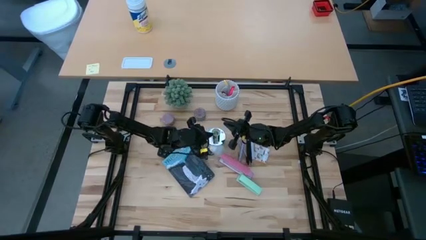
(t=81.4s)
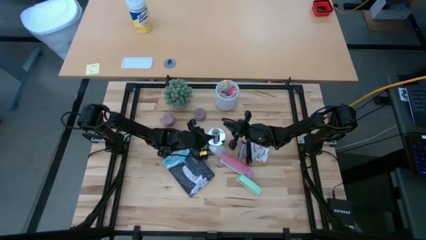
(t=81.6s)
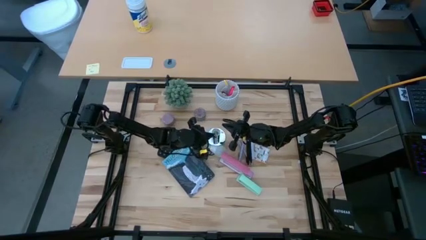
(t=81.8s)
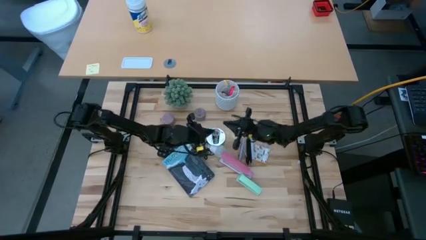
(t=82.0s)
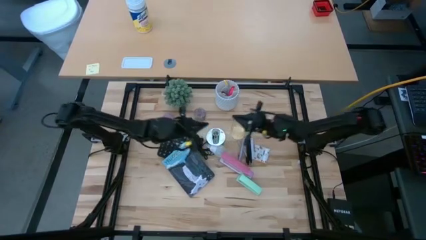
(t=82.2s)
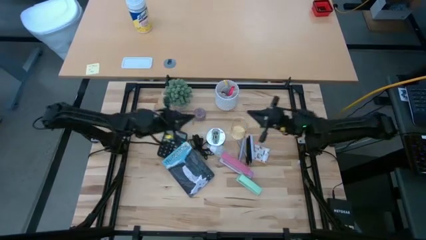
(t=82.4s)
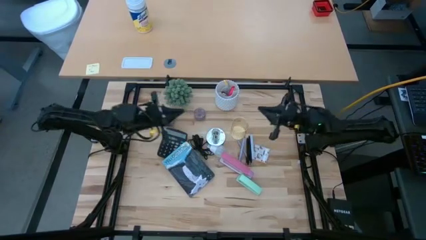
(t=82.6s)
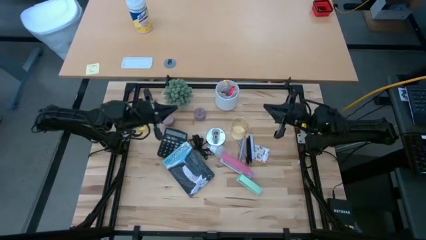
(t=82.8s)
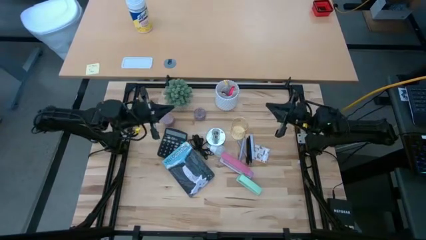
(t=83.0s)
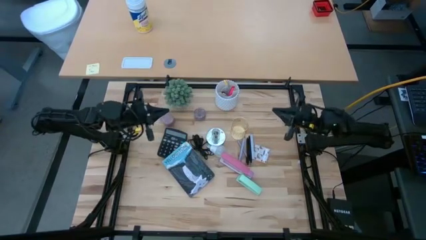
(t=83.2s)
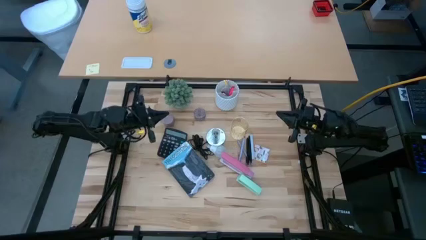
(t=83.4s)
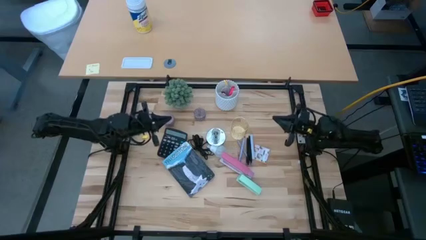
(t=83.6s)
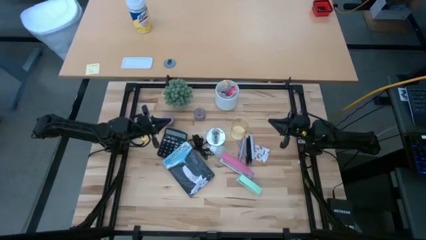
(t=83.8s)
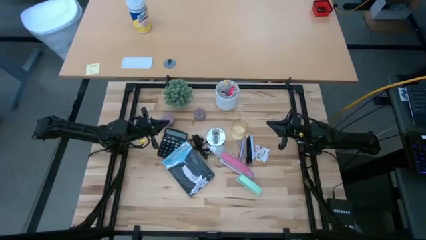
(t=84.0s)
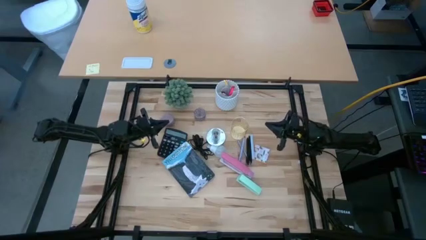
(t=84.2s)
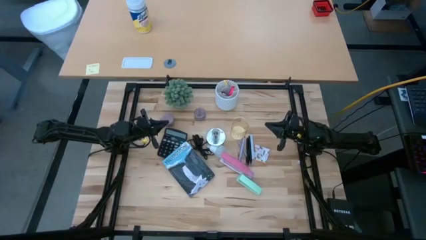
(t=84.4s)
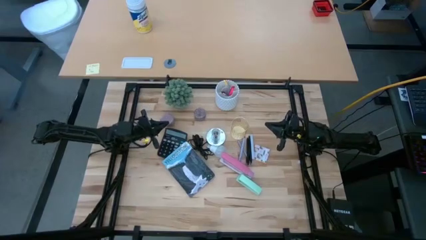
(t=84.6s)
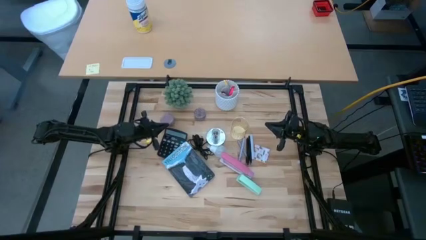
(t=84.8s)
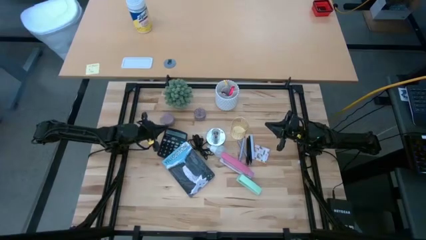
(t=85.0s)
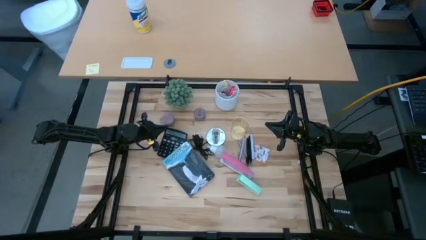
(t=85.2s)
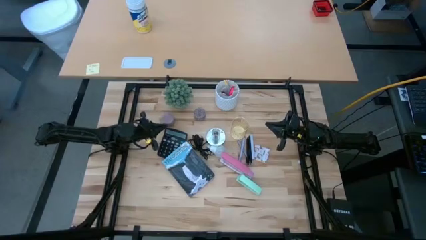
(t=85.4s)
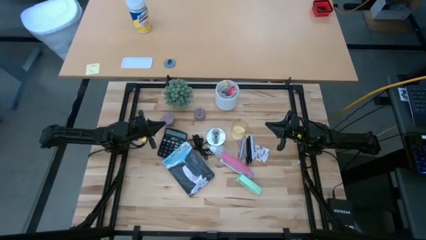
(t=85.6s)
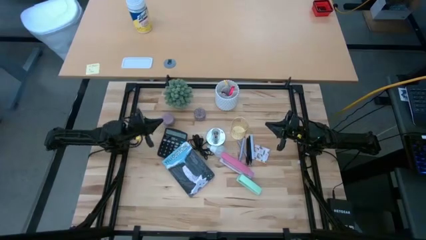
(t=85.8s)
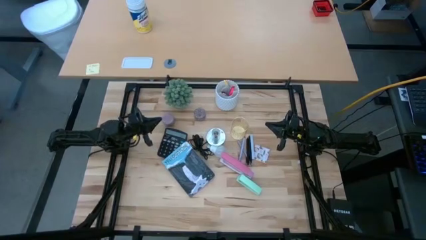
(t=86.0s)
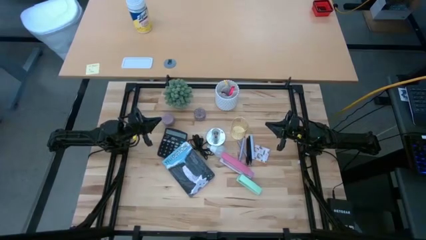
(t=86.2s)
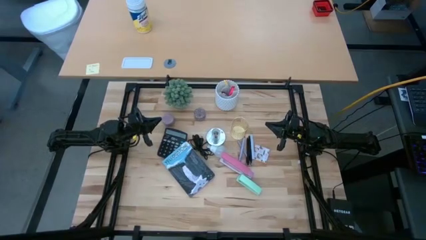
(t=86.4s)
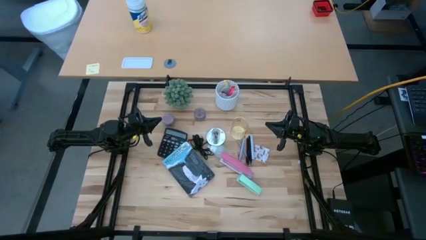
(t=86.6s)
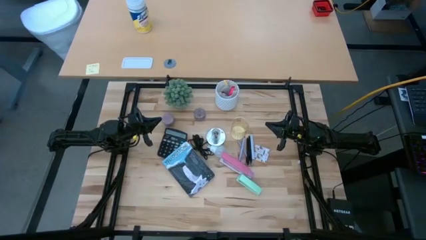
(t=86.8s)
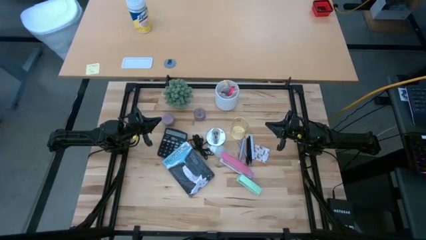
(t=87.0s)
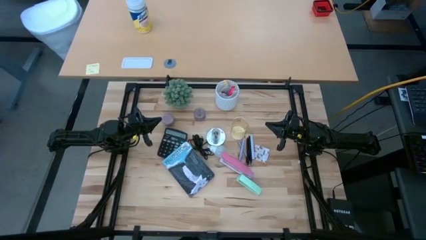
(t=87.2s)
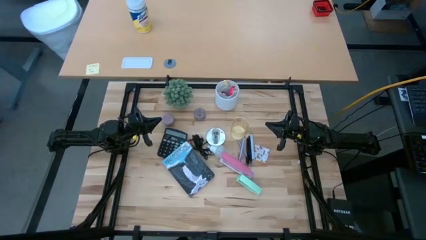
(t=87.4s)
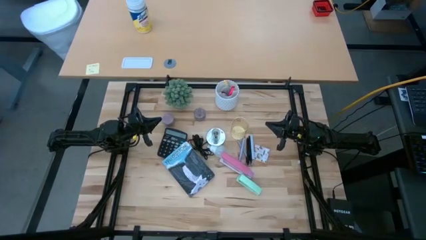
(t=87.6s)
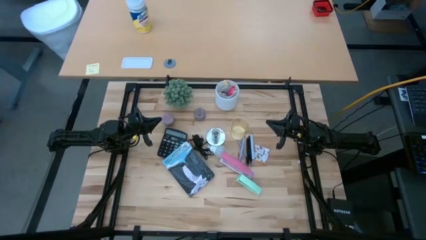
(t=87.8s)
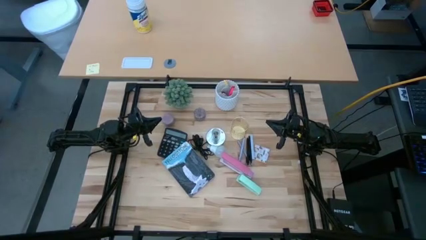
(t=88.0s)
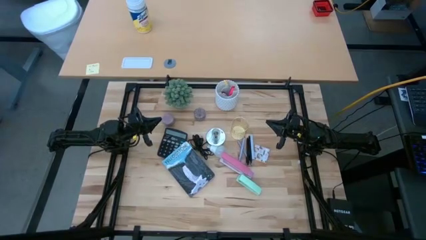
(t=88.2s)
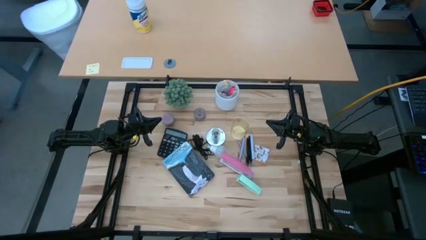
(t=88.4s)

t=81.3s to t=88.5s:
Task: Screw lightbulb
Return to Home Position

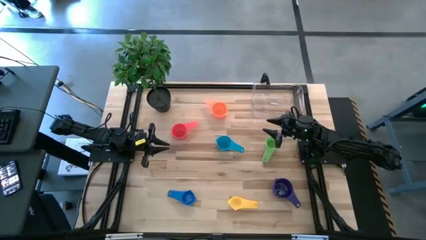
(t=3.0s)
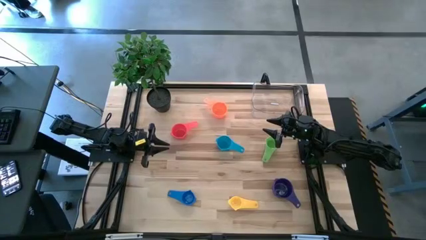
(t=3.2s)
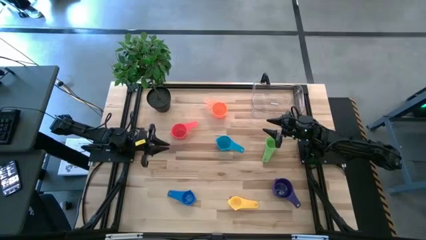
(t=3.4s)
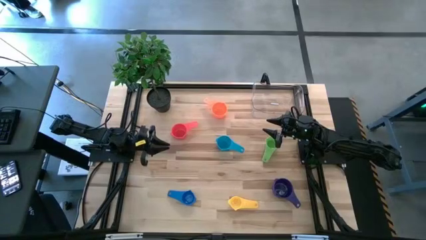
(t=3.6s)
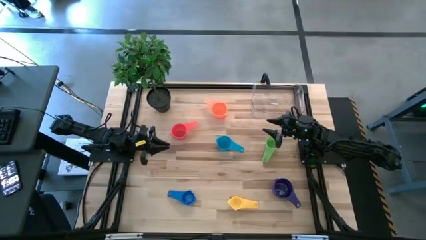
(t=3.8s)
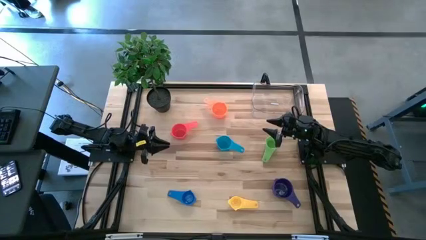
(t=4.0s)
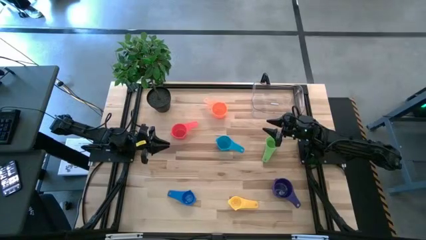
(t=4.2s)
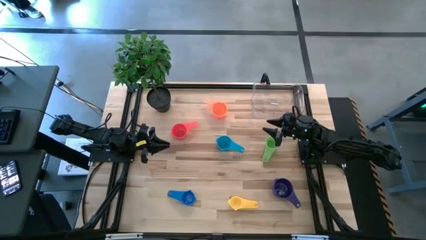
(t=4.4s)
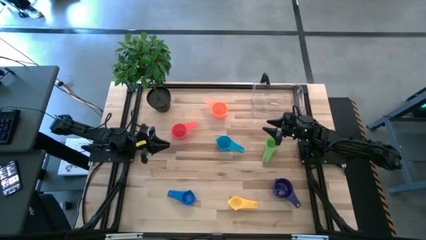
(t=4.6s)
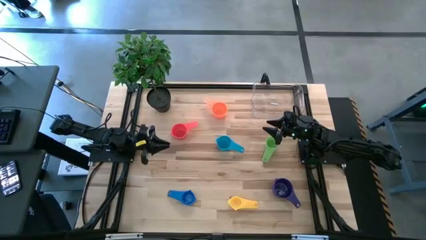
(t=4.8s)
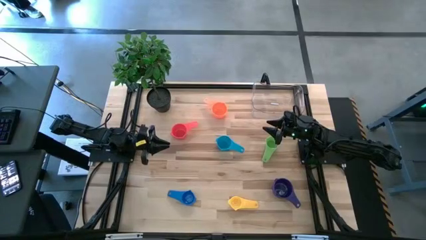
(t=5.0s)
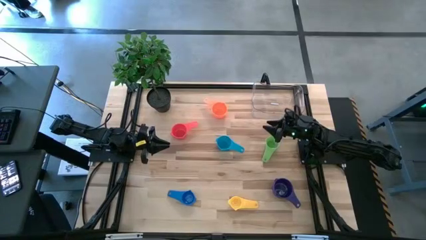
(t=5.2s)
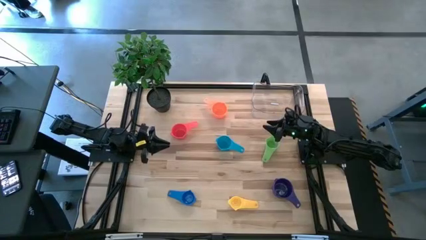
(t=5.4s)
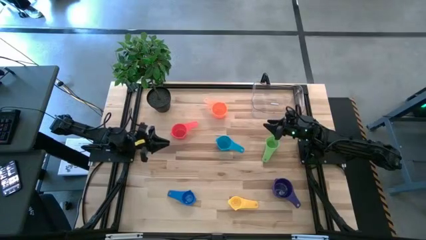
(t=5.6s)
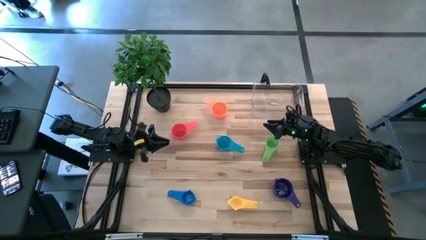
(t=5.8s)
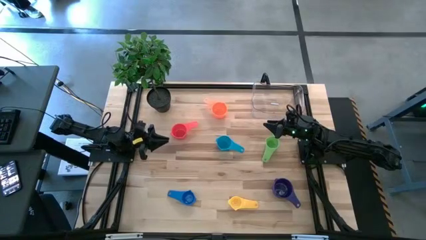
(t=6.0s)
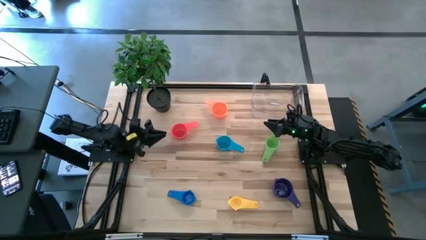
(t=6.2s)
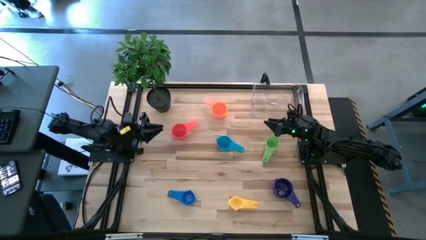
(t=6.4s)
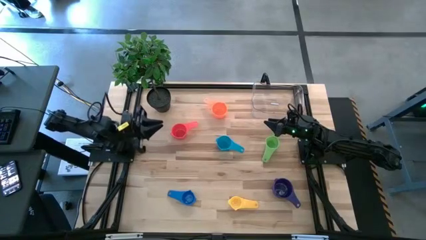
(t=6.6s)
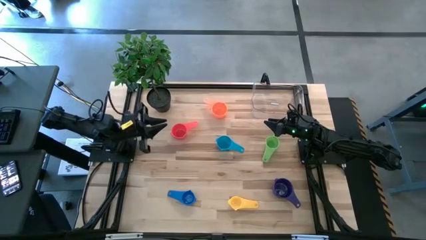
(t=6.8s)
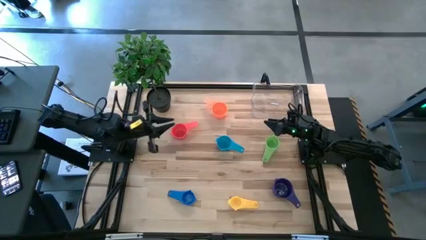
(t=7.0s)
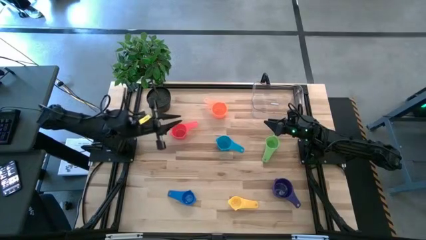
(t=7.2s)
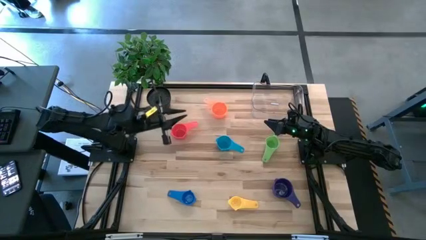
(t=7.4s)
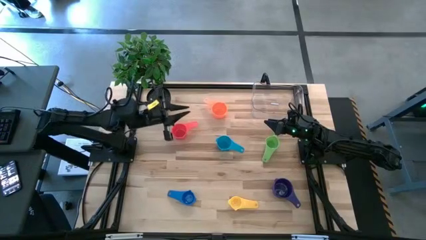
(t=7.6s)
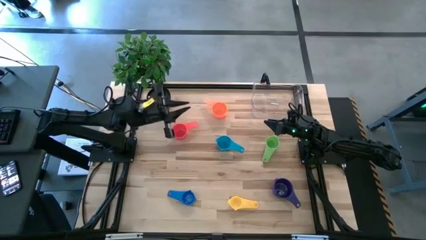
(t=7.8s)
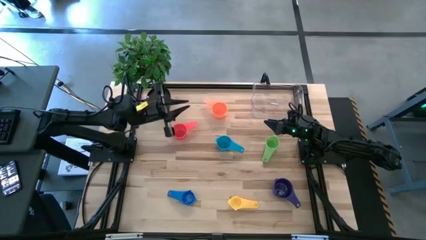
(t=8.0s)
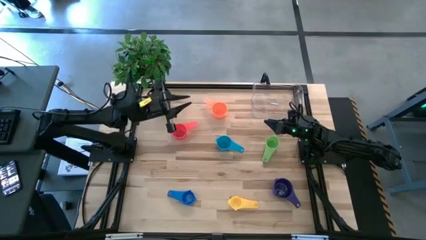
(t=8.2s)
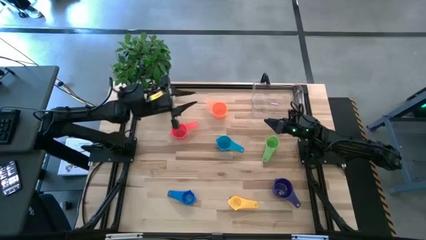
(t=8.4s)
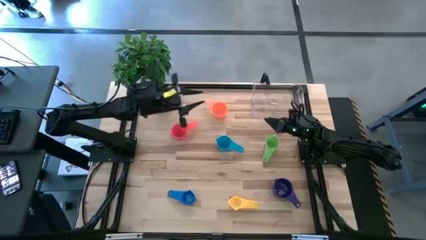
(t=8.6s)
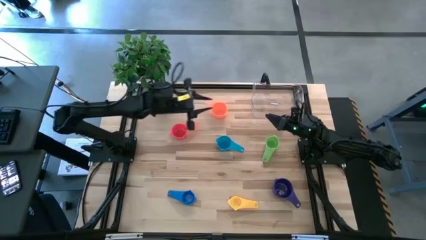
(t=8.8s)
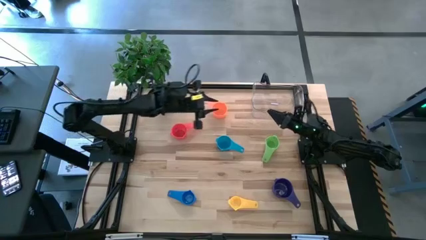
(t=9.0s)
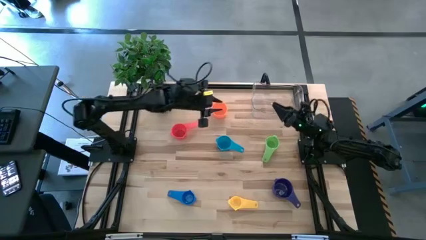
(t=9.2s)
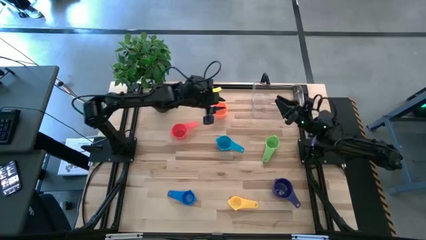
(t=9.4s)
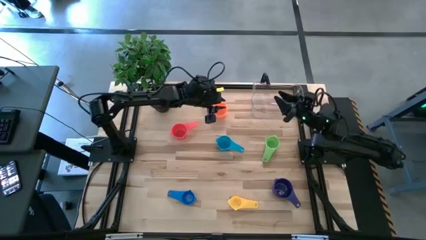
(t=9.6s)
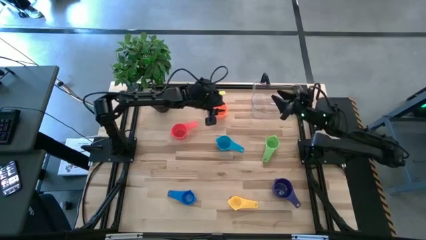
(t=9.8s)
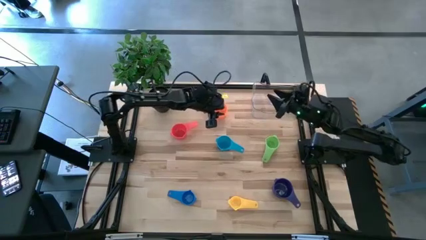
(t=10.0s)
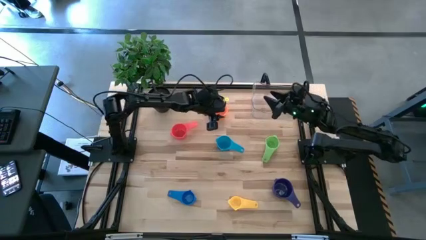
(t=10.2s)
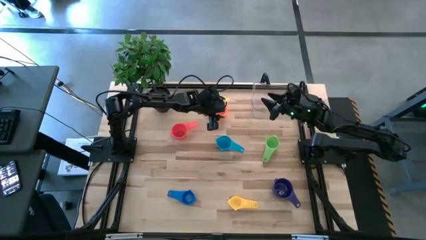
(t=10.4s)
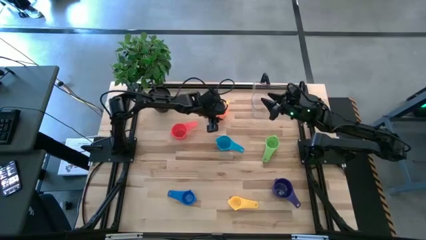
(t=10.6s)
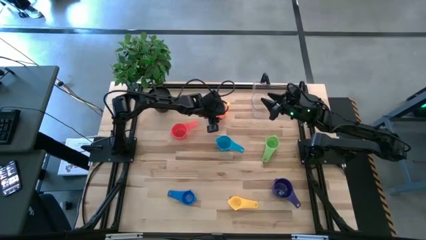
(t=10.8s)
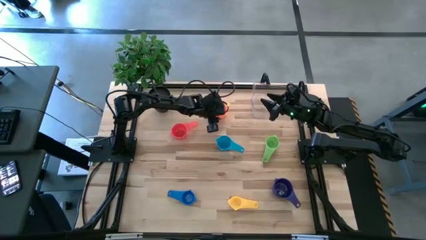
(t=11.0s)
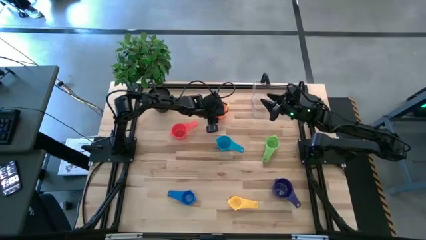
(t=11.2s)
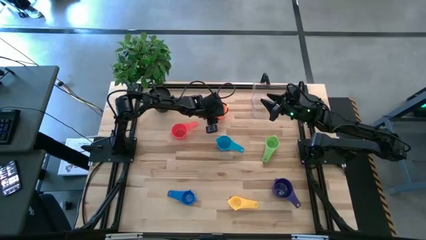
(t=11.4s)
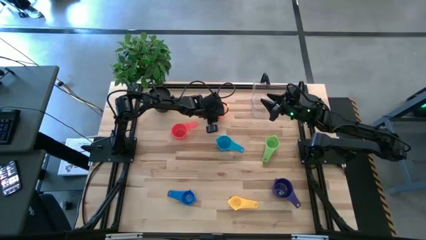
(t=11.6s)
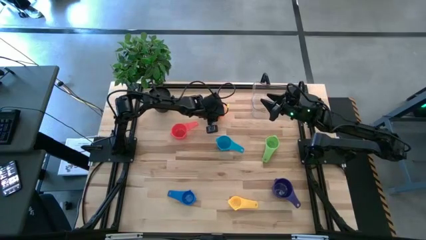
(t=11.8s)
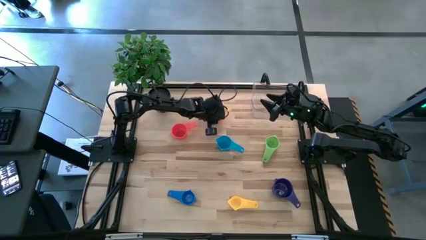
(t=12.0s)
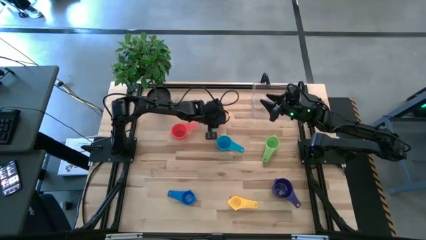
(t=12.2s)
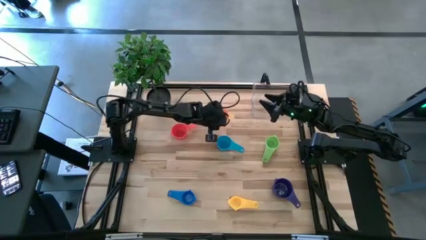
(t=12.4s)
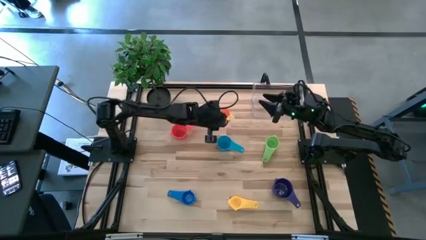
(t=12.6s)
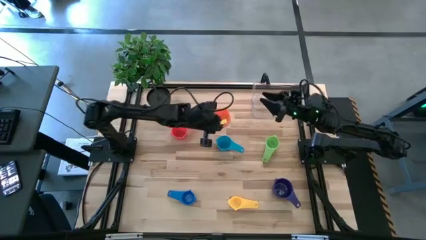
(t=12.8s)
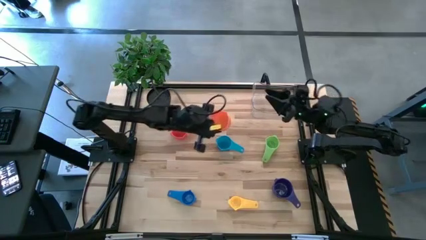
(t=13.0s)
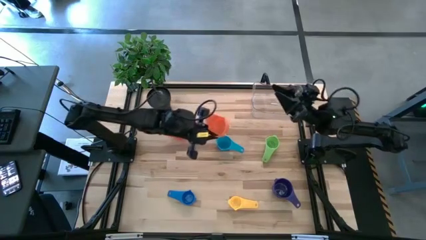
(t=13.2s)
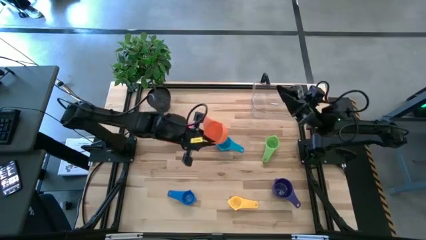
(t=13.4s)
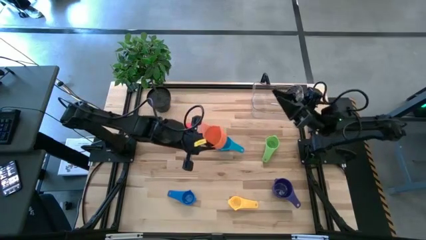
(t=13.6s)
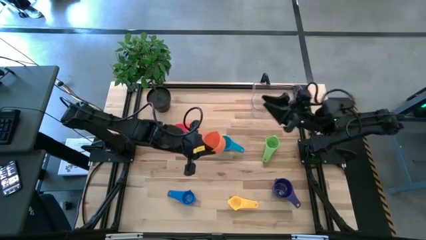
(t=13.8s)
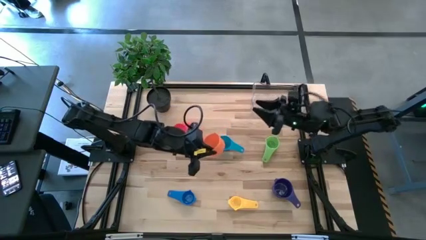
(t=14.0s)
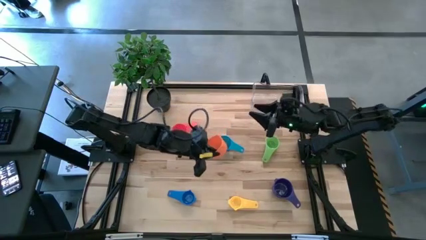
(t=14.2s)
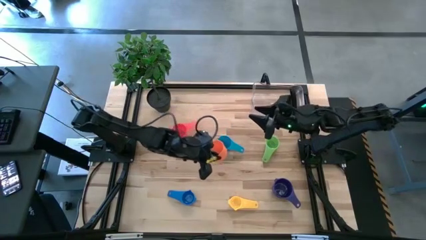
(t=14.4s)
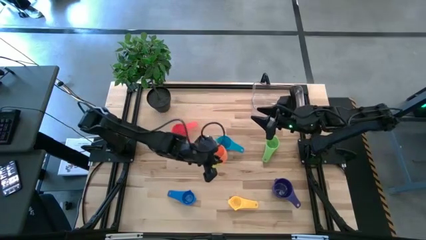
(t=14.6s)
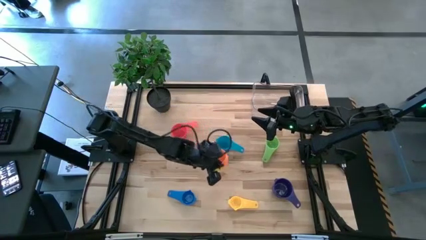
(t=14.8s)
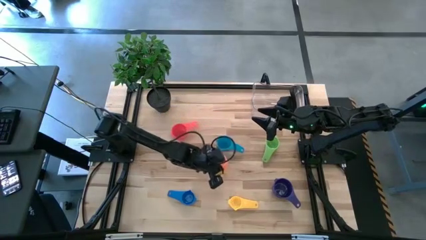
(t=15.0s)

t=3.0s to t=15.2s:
Task: Nest measuring cups in basket
Stack the orange measuring cup on top of the purple measuring cup
